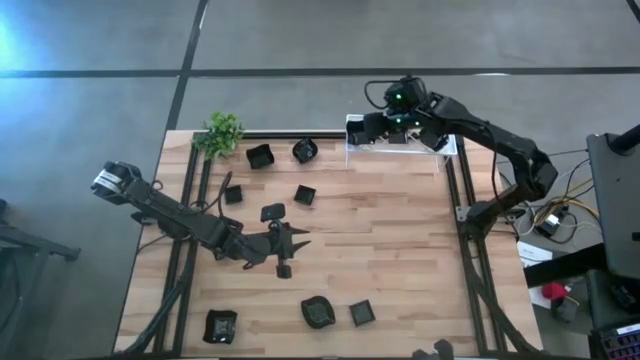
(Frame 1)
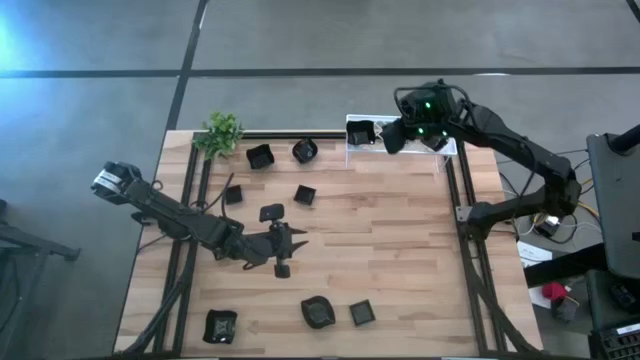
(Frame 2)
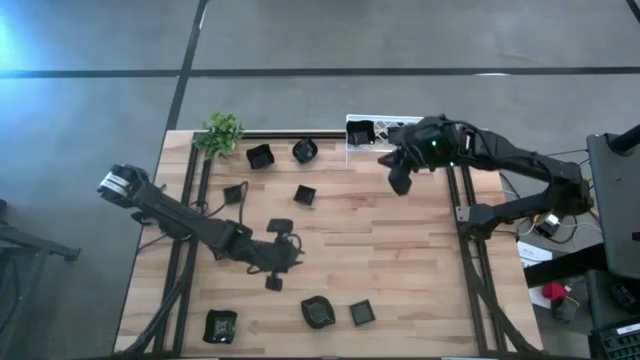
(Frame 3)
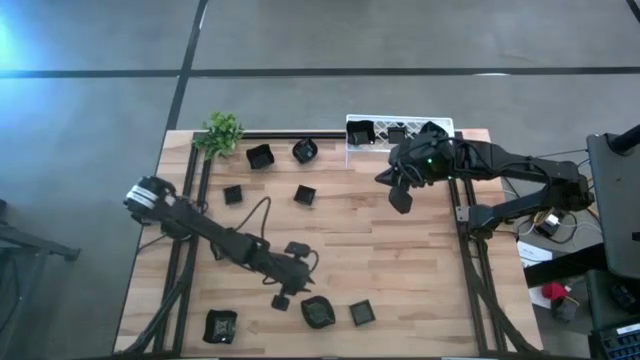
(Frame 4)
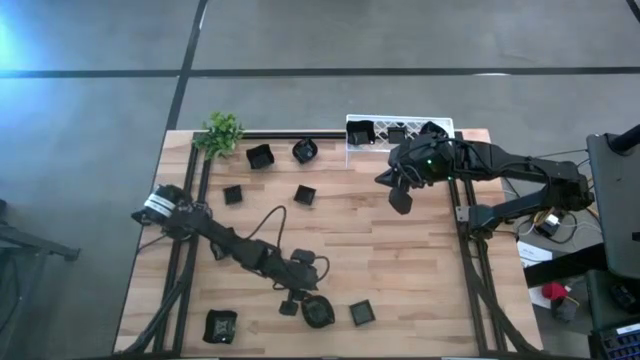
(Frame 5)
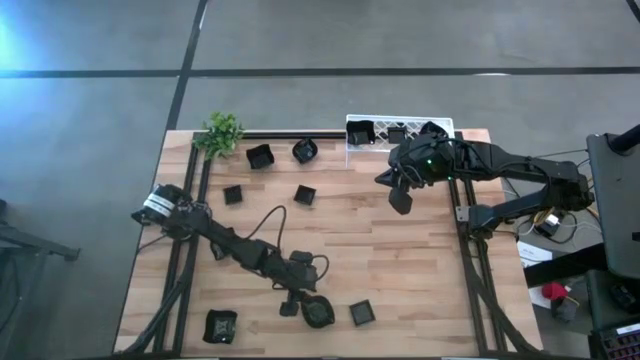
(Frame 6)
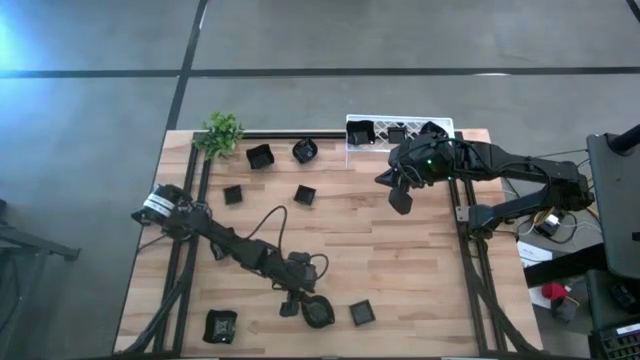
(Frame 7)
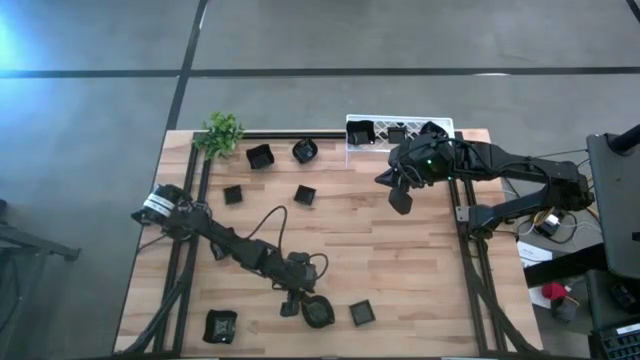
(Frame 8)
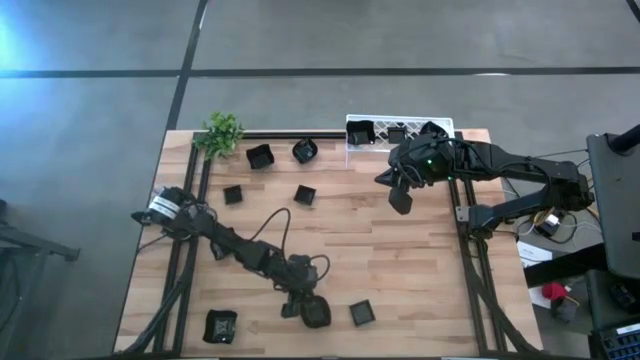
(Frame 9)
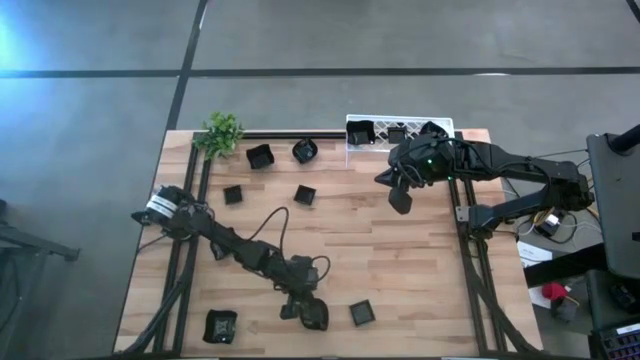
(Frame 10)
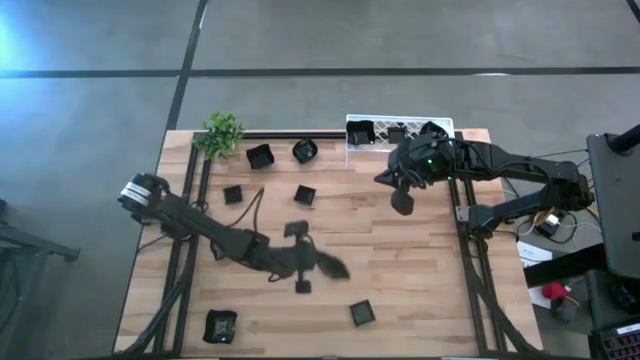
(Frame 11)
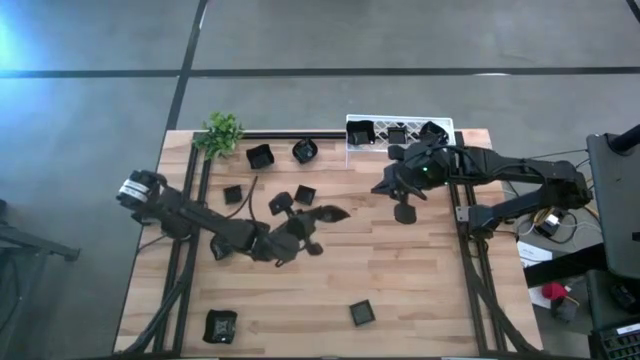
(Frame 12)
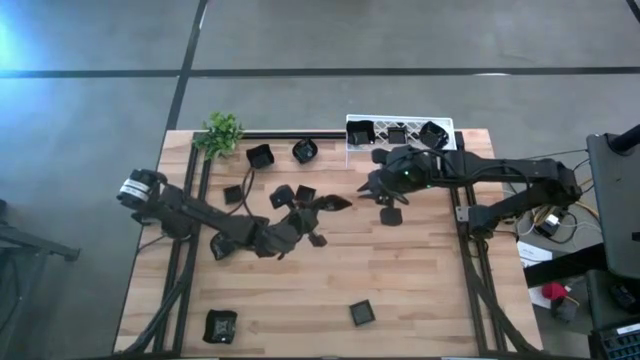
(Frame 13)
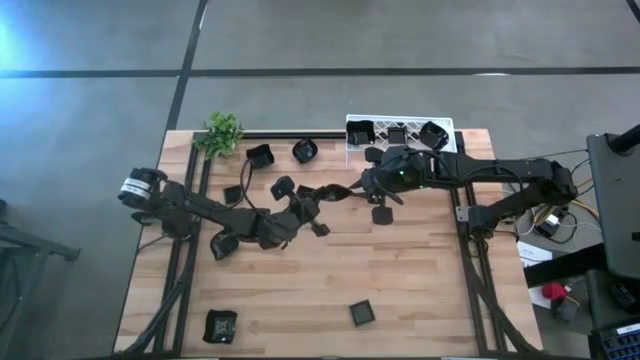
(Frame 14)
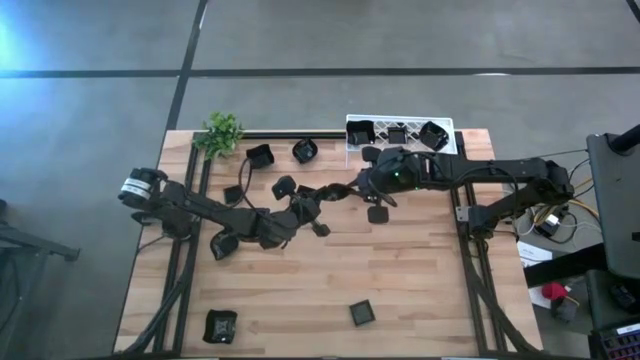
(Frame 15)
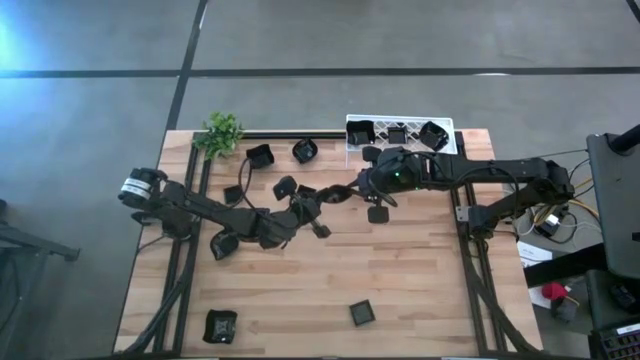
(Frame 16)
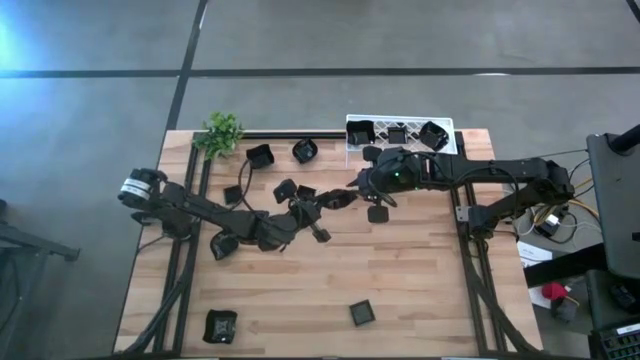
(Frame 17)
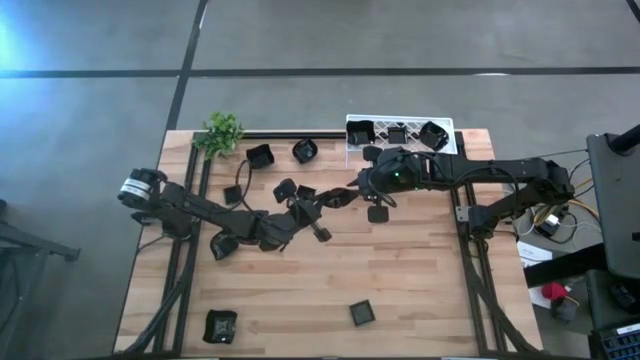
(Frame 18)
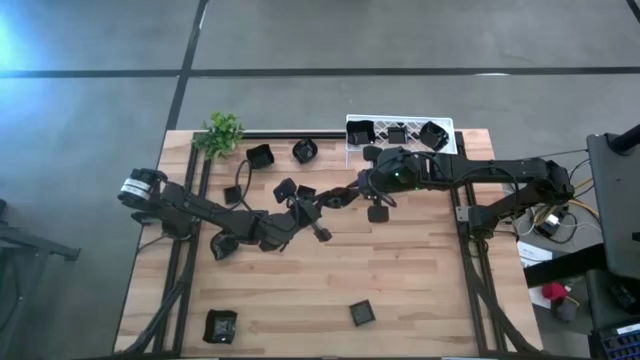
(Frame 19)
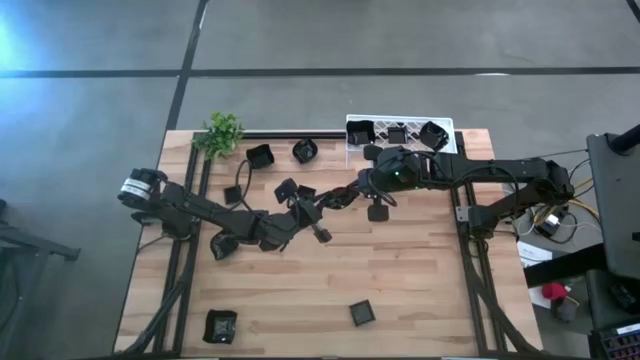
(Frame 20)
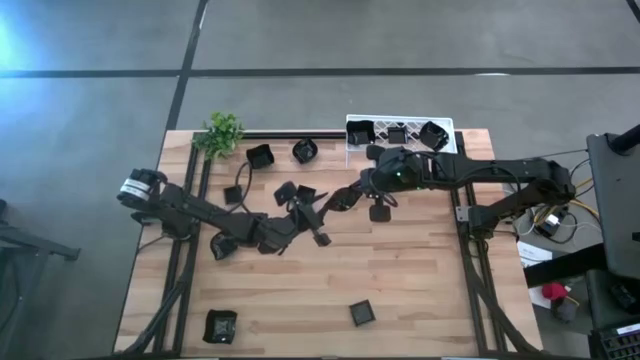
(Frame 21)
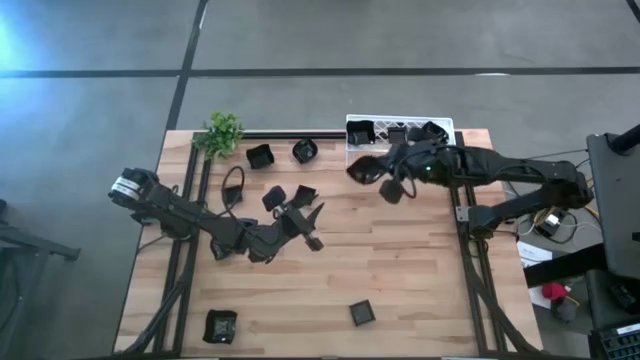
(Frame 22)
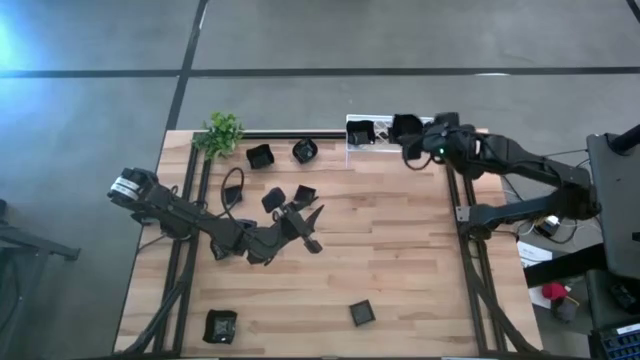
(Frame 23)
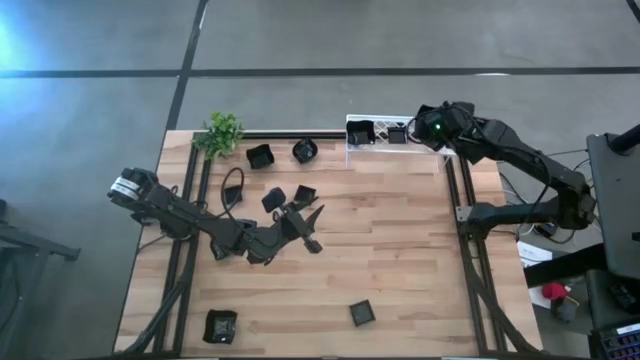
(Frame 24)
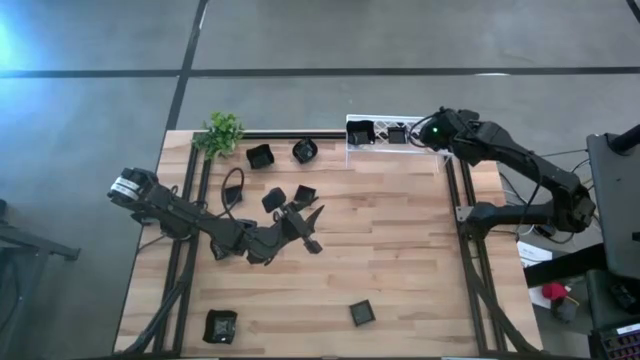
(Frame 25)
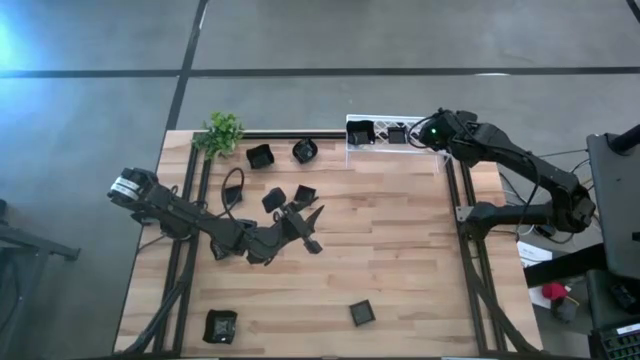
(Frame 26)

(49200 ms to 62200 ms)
Task: Pick & Place Mini shaped plates
Stack the black leaf-shaped plate on top of the black leaf-shaped plate on the shelf

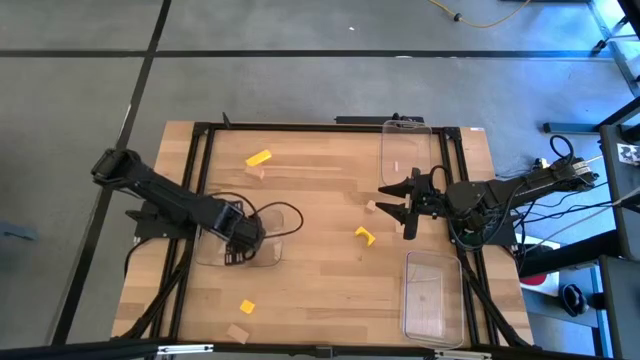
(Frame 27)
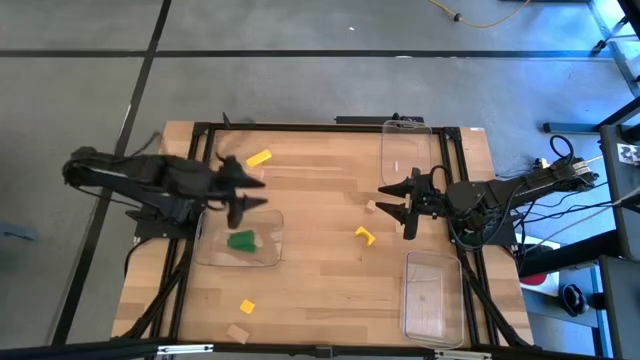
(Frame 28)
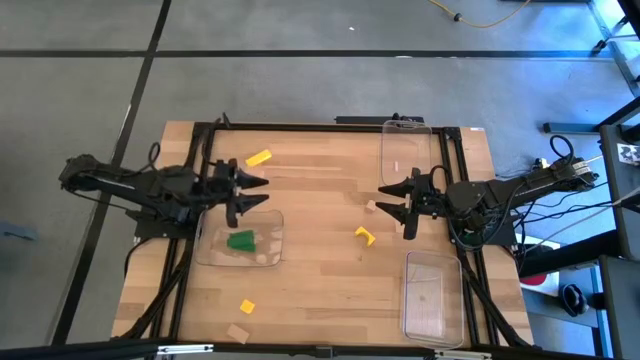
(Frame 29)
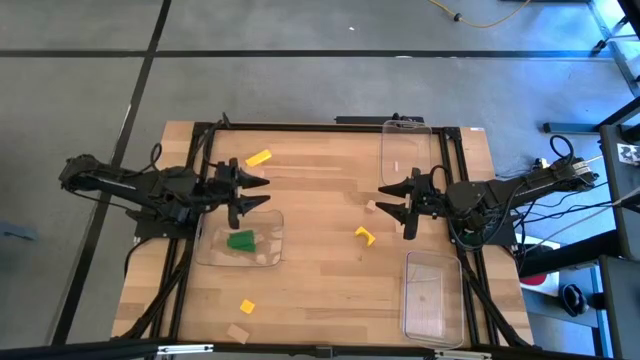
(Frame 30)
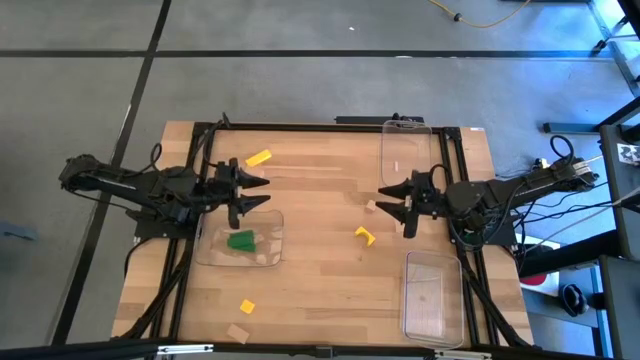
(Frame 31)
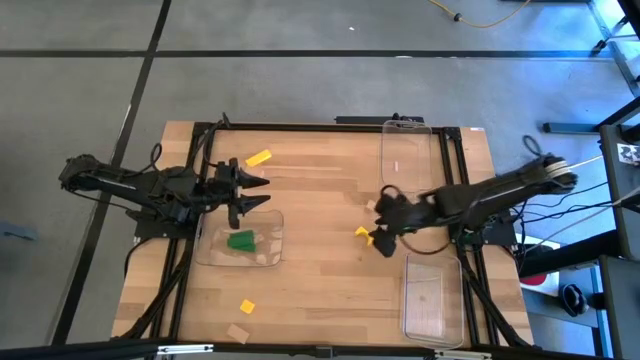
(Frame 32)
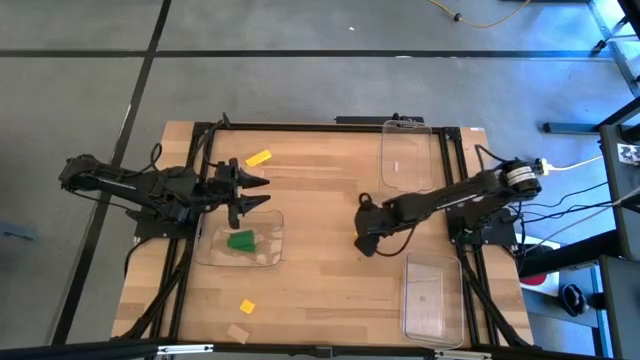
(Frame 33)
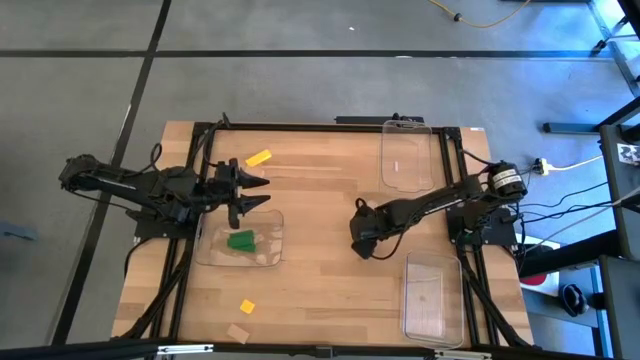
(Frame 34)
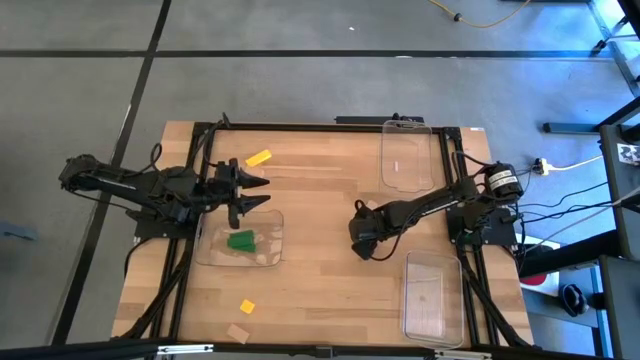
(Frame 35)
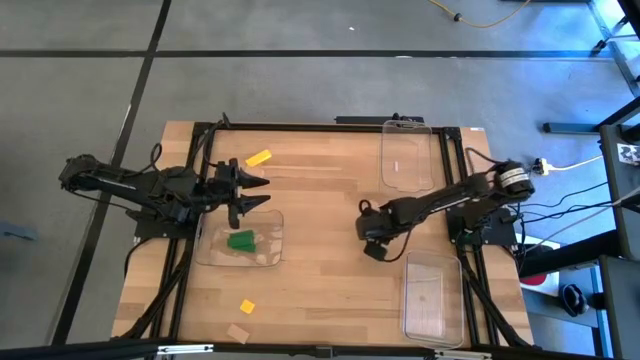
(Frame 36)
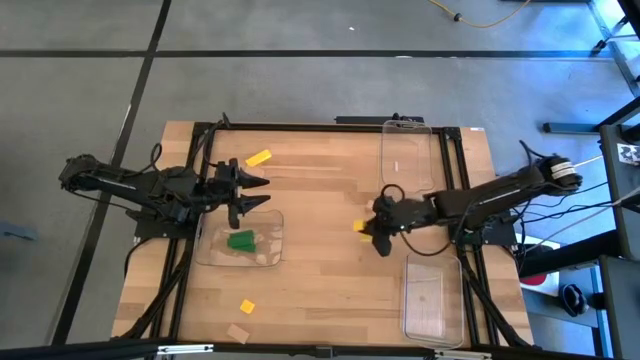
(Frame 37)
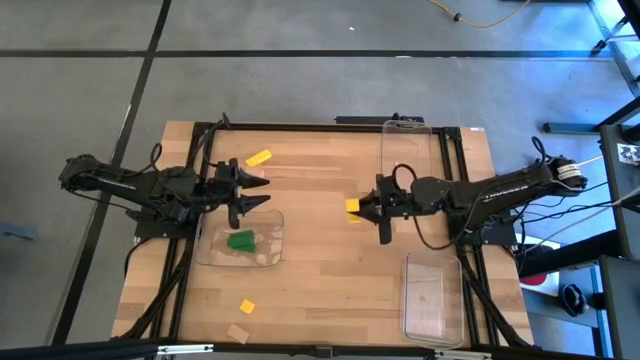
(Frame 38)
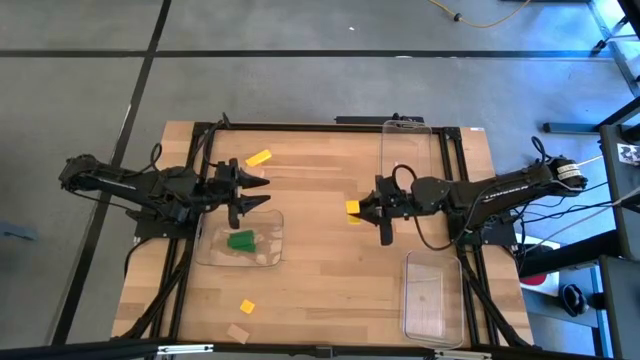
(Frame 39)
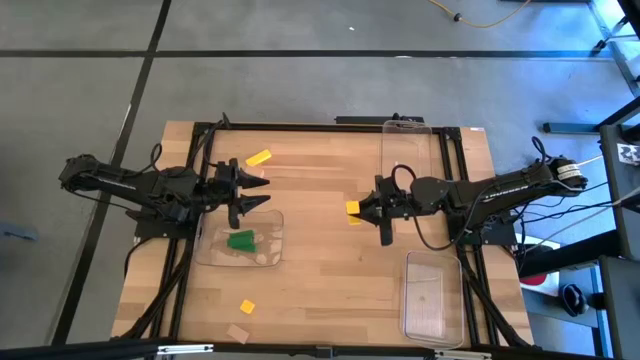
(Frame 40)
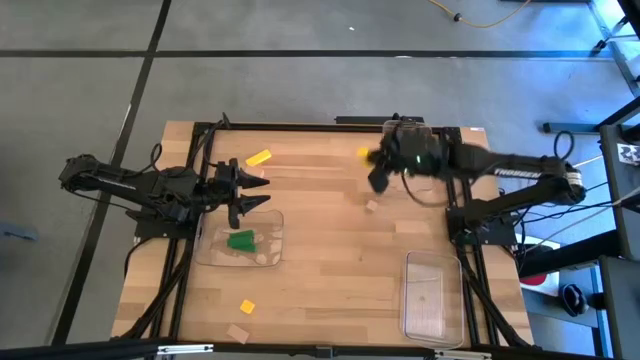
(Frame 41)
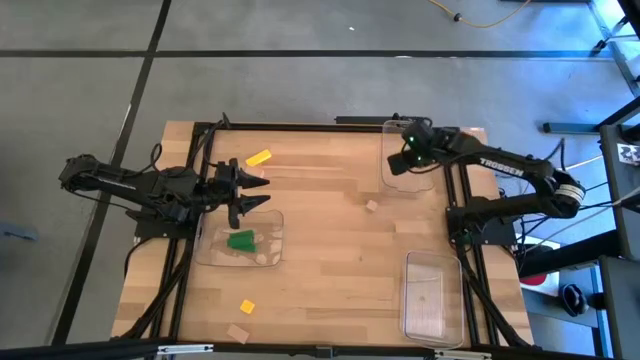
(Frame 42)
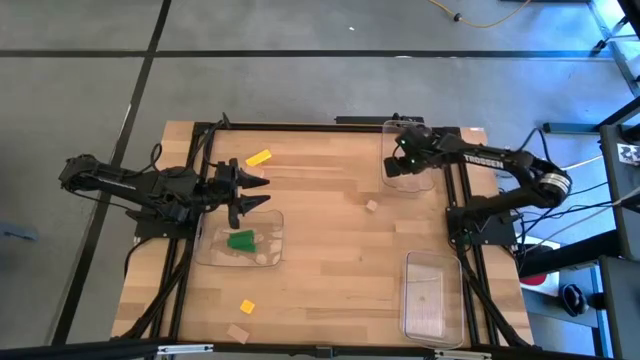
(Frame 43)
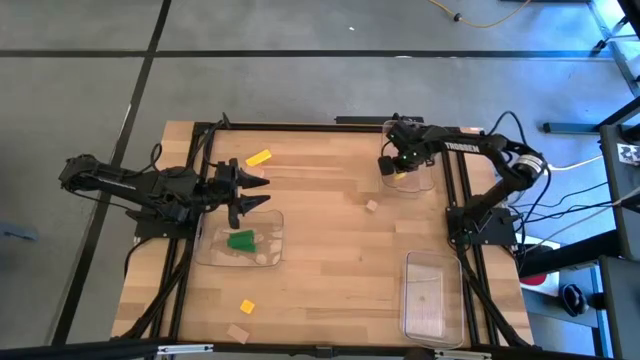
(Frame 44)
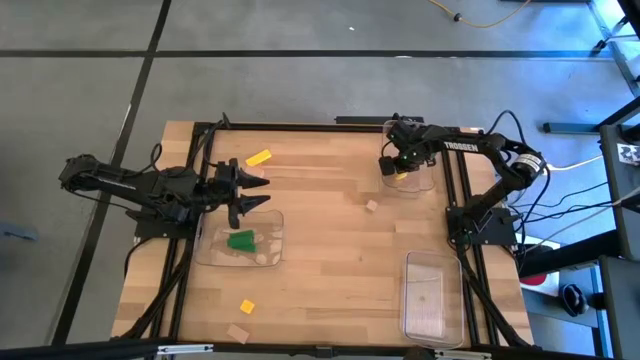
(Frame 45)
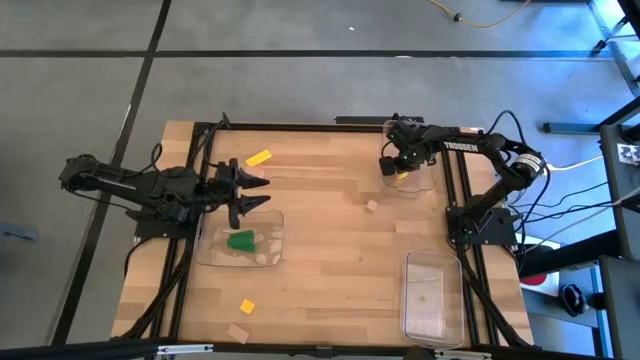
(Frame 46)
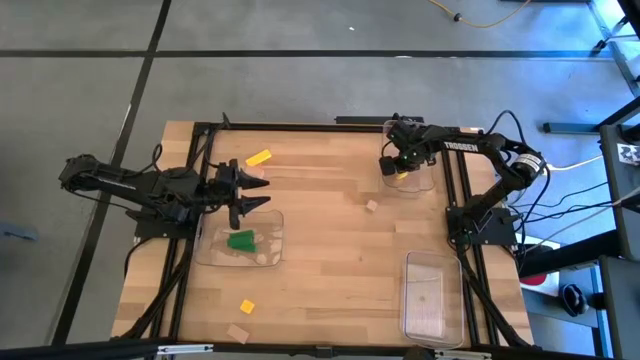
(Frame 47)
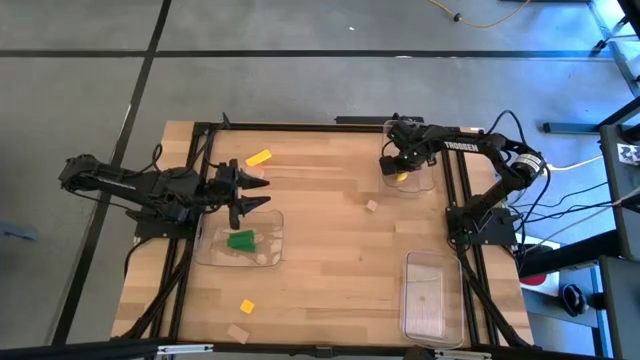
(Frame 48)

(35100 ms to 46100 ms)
Task: Sort & place blocks by color
Put the right yellow block into the top right transparent bin
